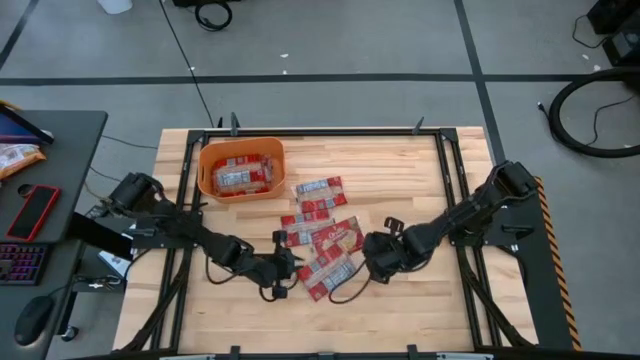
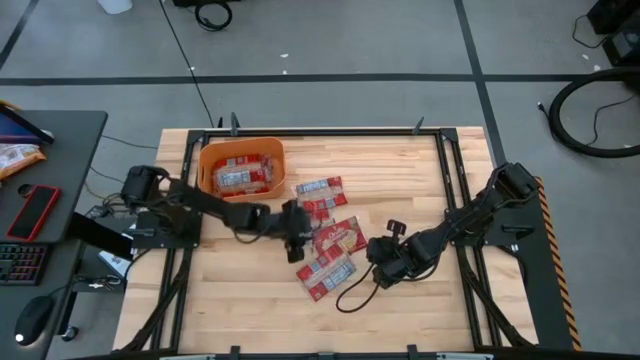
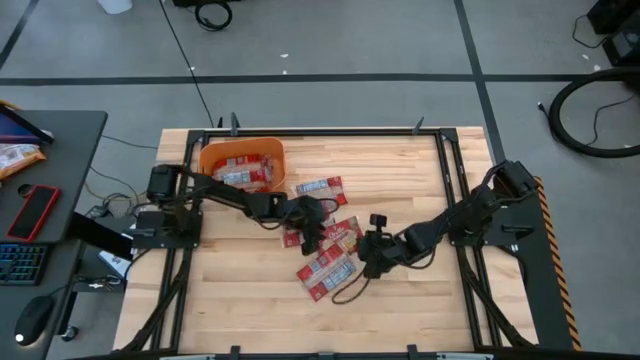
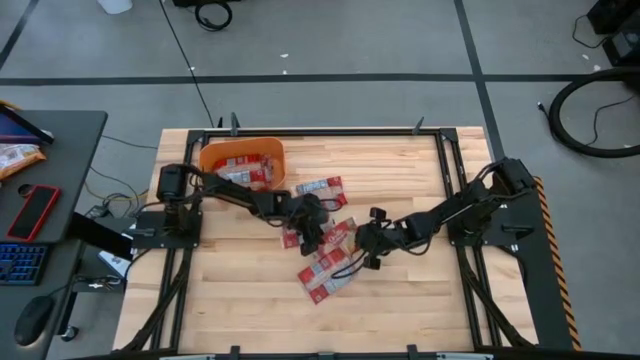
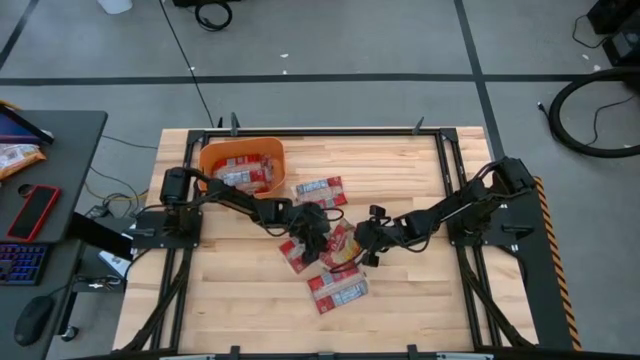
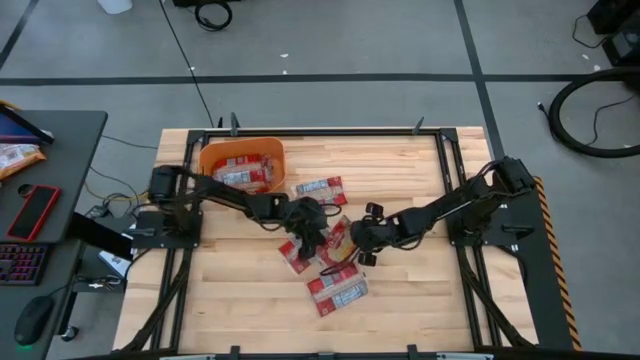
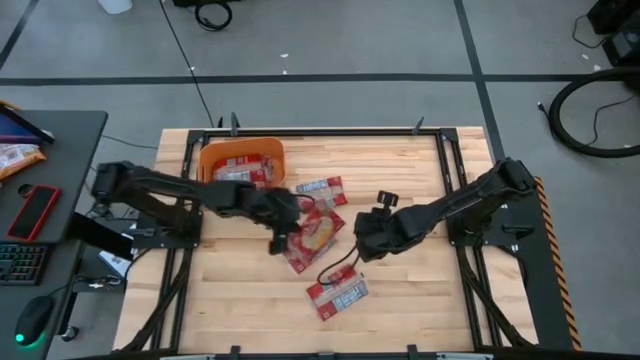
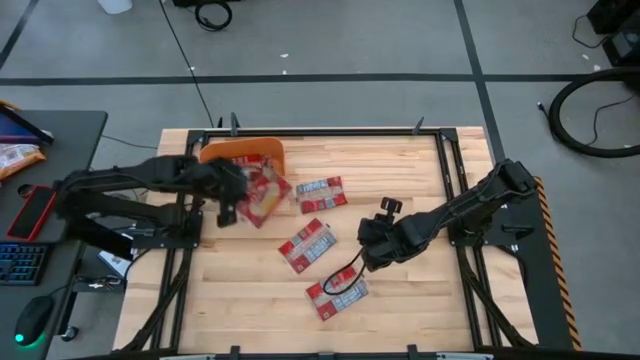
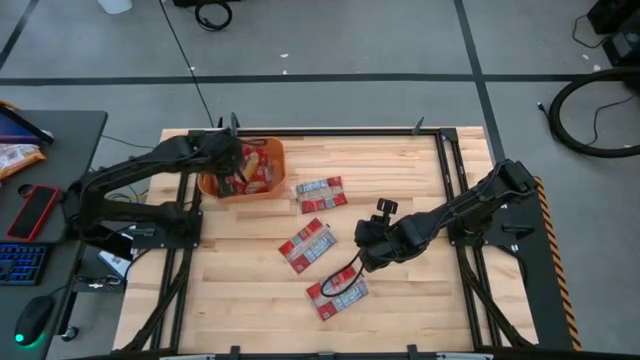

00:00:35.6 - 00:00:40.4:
Task: Sort popcorn bags into baskets
Put the red popcorn bag into the orange bin

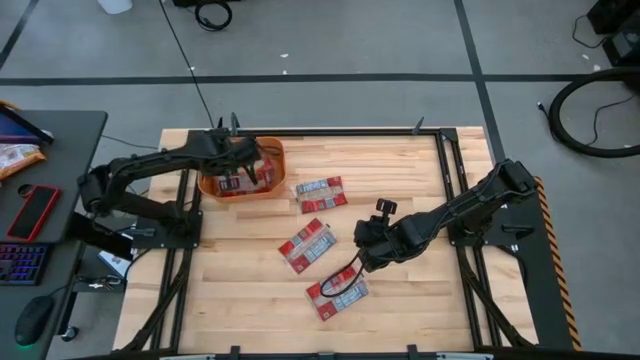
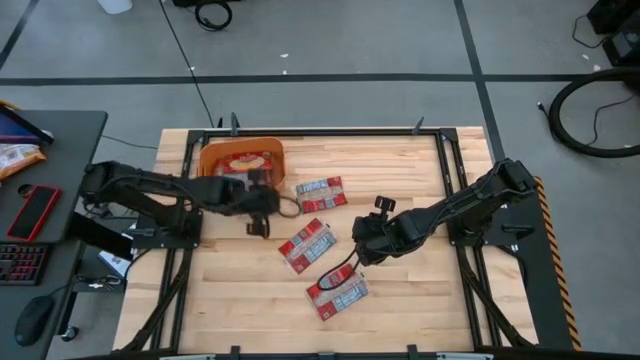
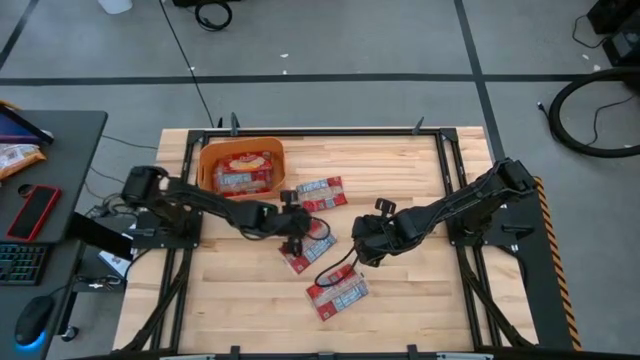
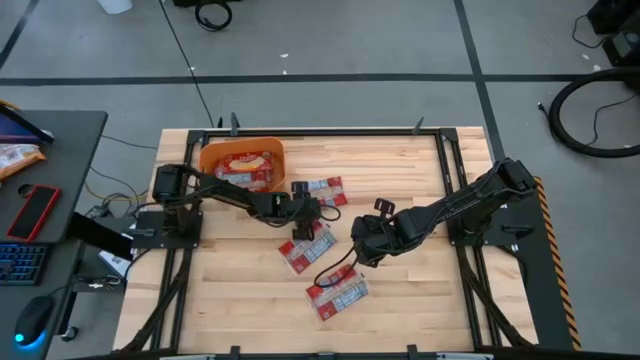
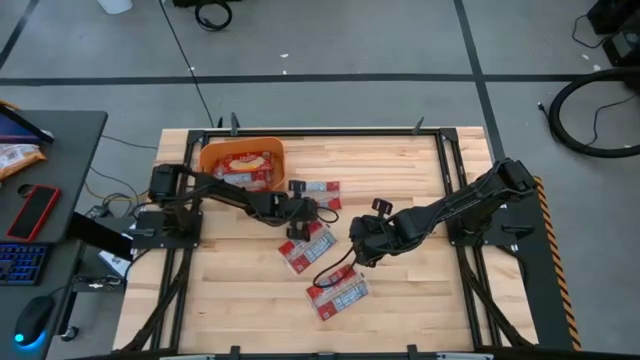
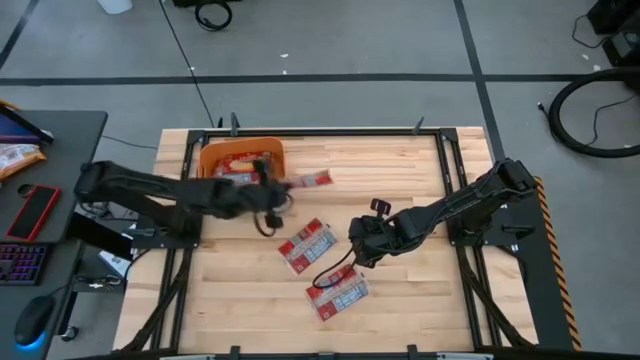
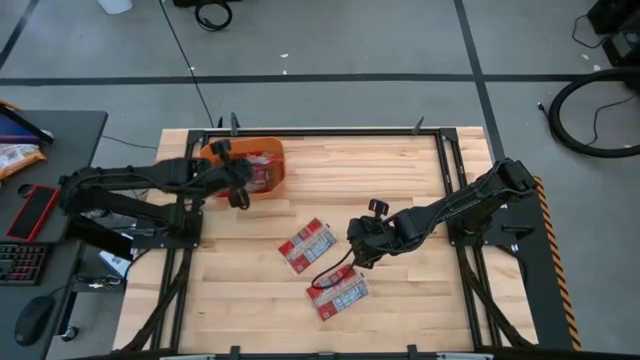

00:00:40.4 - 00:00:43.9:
Put the red popcorn bag into the orange bin

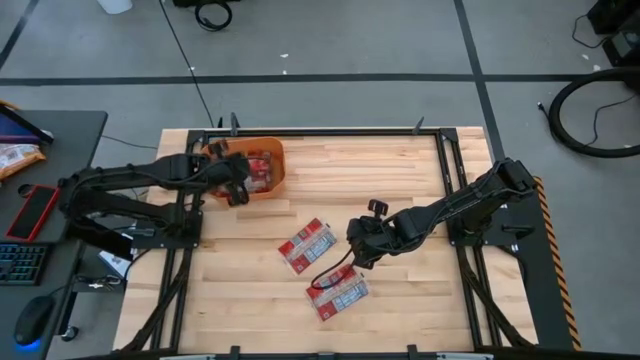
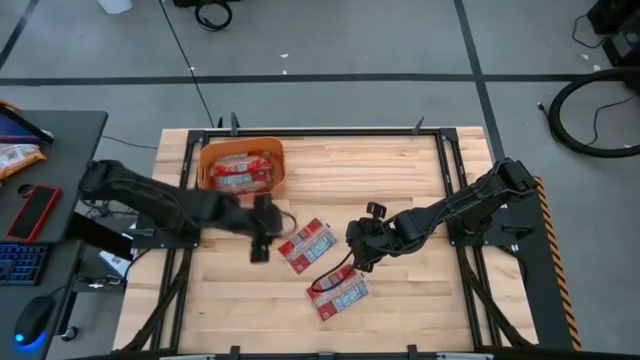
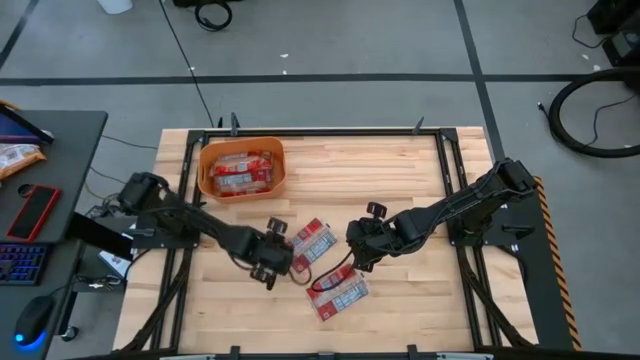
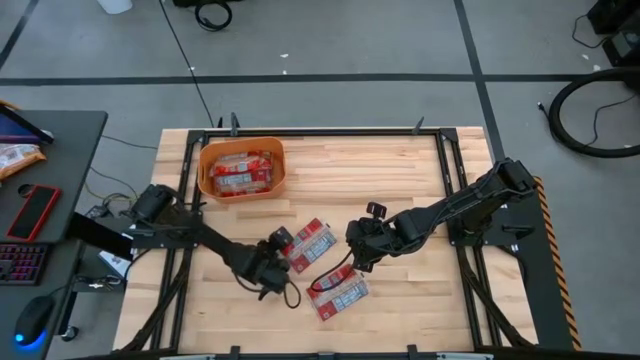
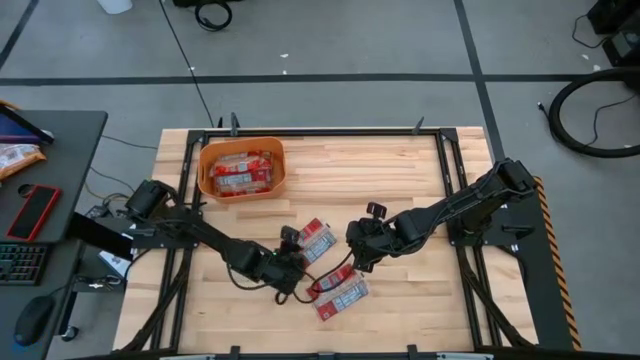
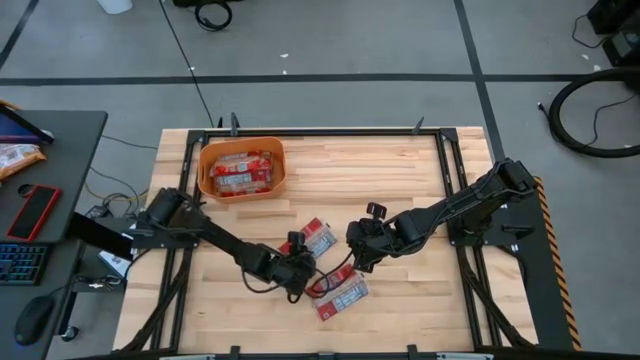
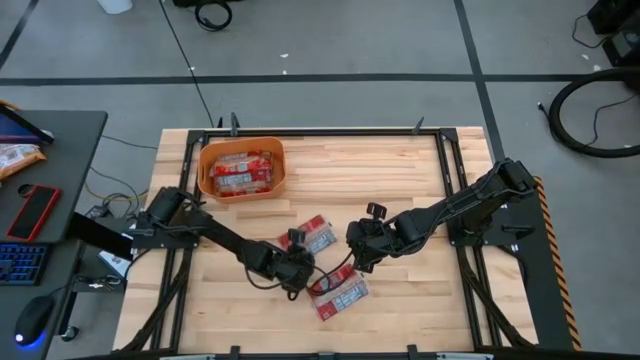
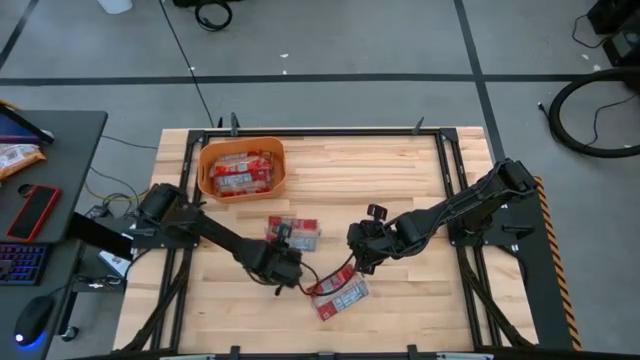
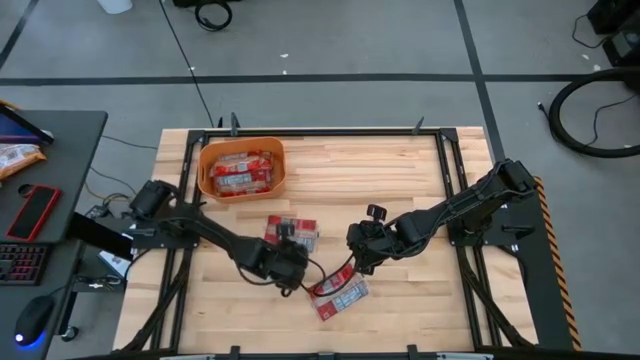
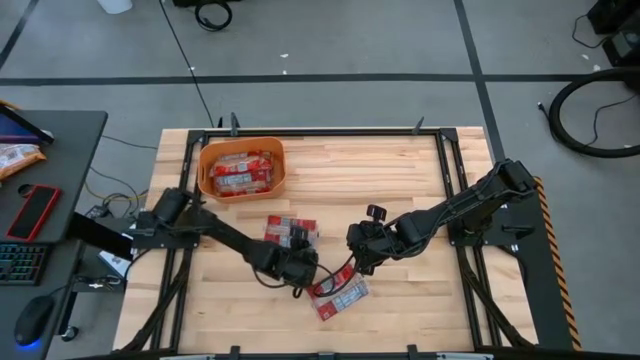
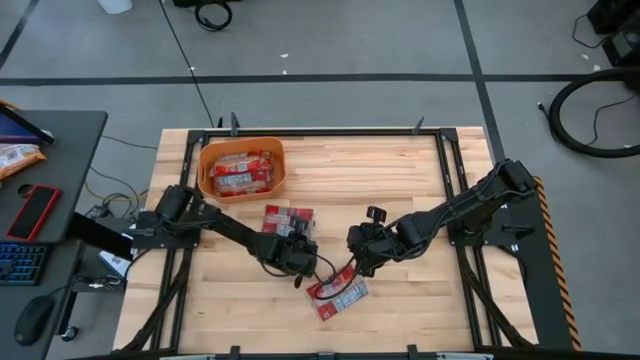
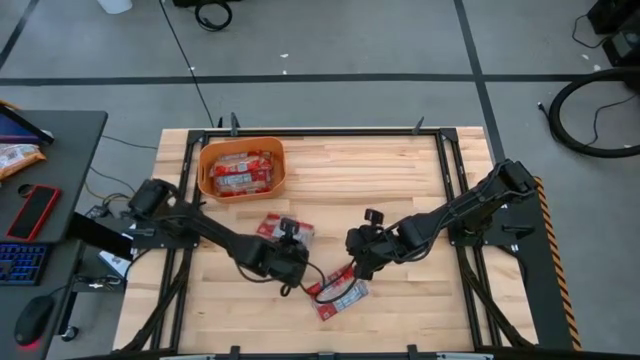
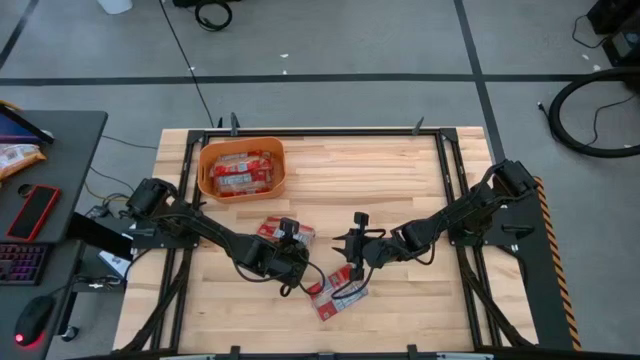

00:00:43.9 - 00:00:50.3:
Put the red popcorn bag into the orange bin

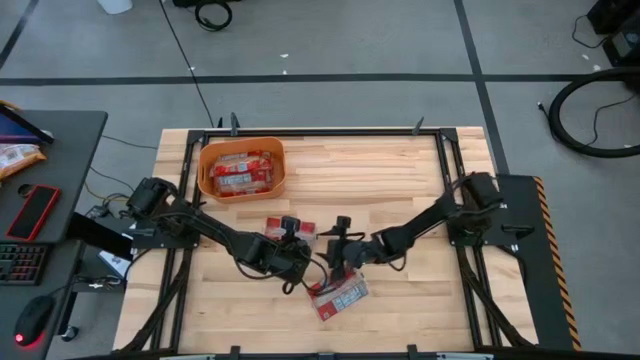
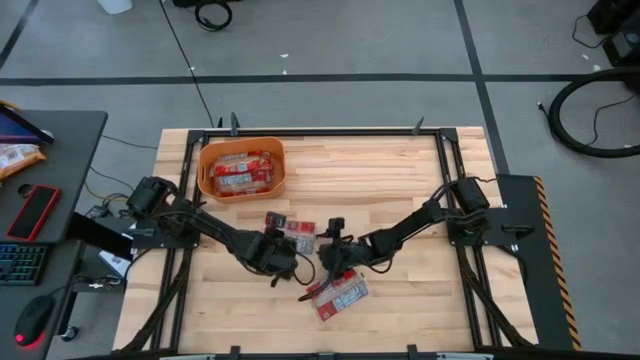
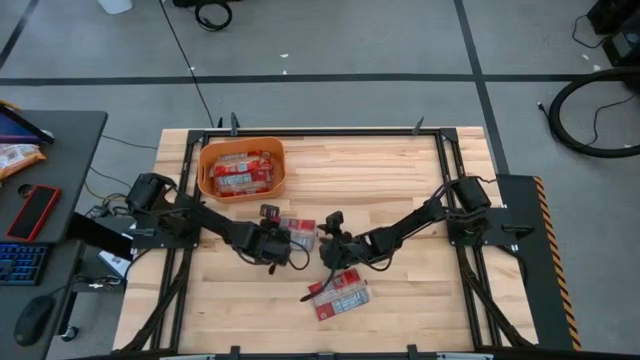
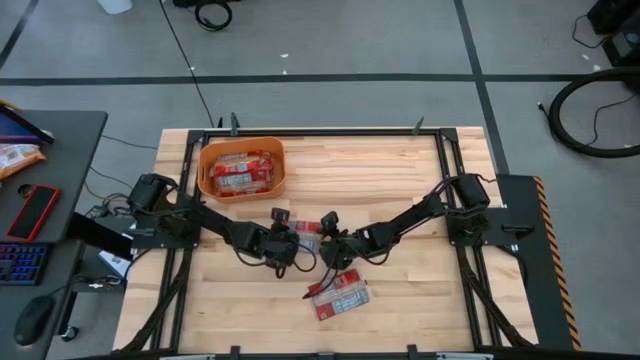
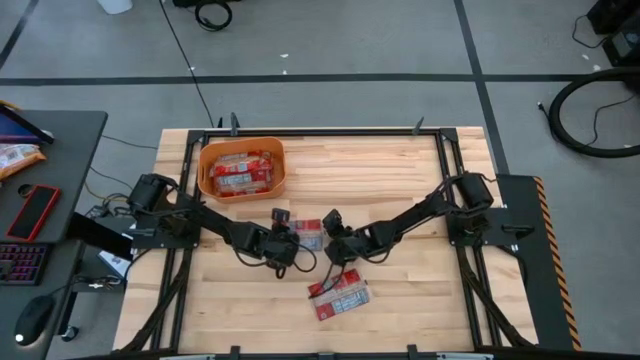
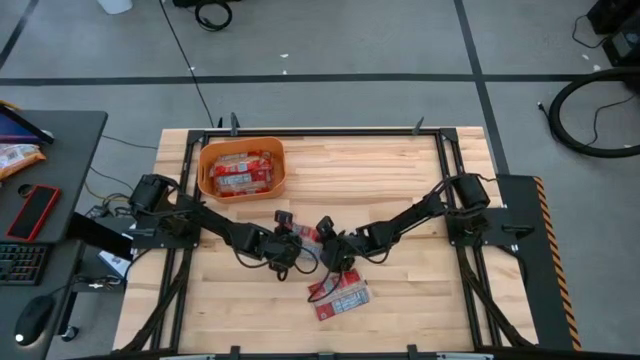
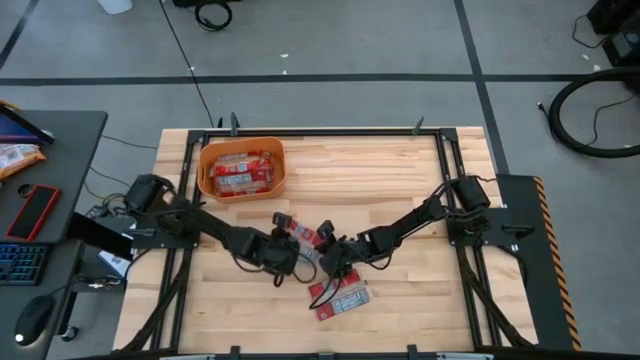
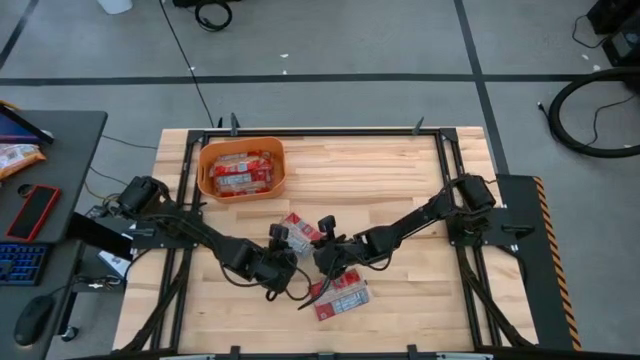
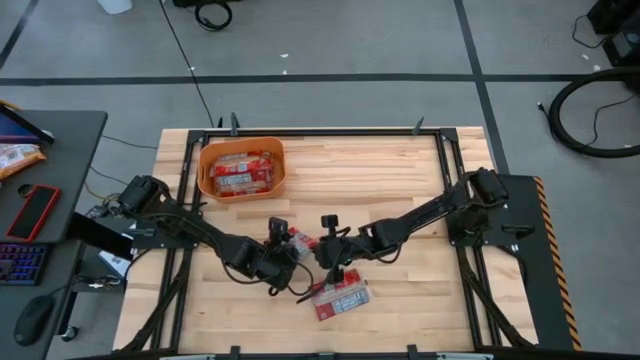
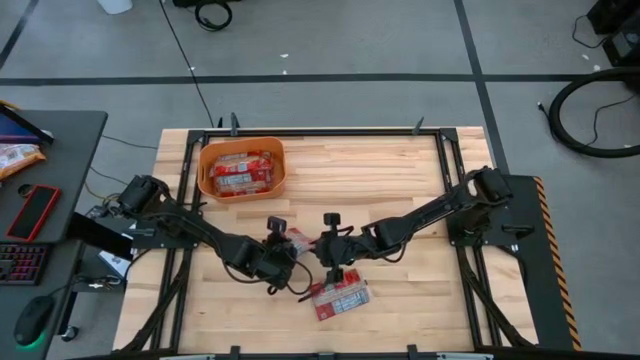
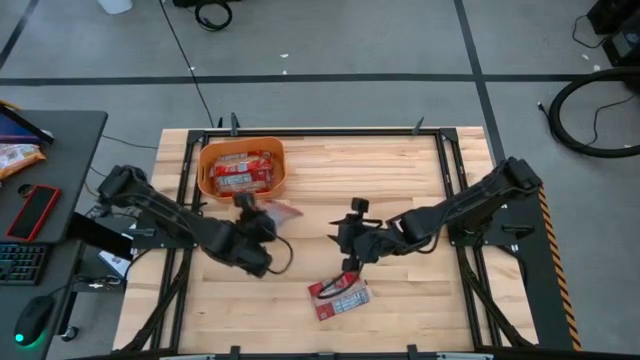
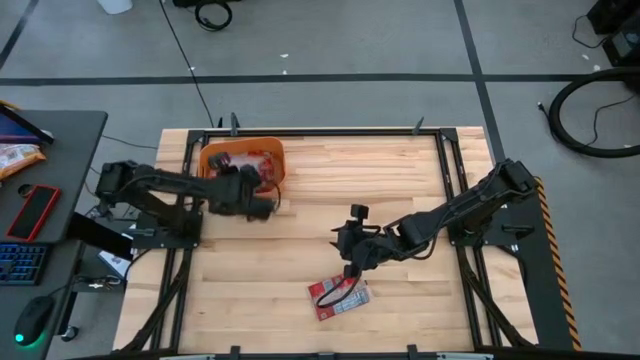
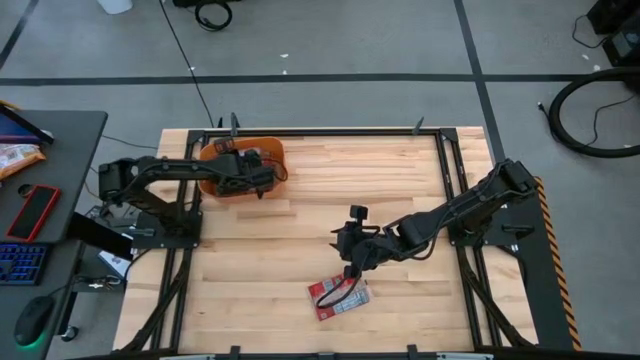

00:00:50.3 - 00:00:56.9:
Put the red popcorn bag into the orange bin
